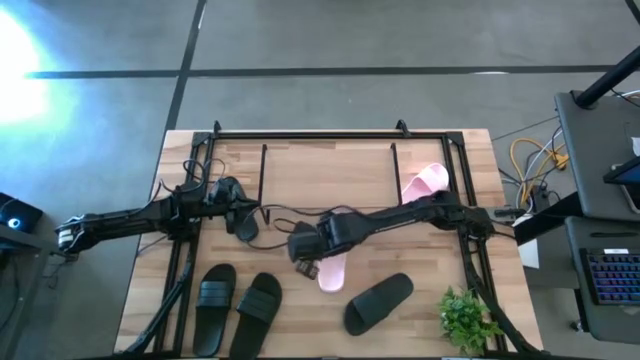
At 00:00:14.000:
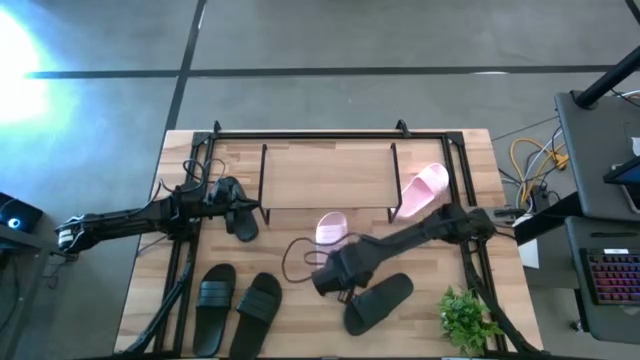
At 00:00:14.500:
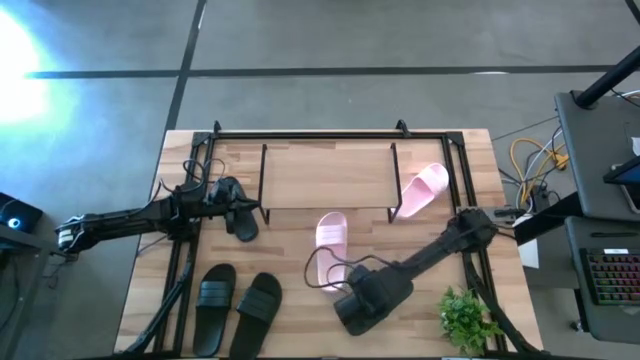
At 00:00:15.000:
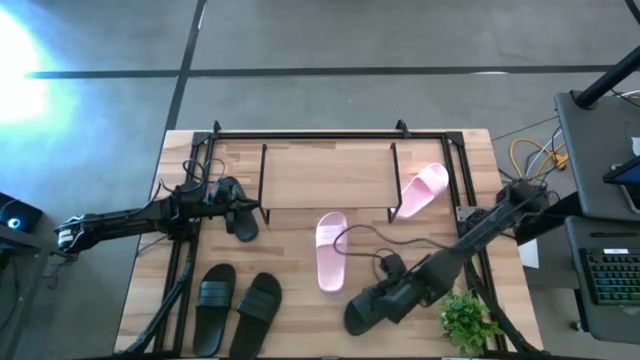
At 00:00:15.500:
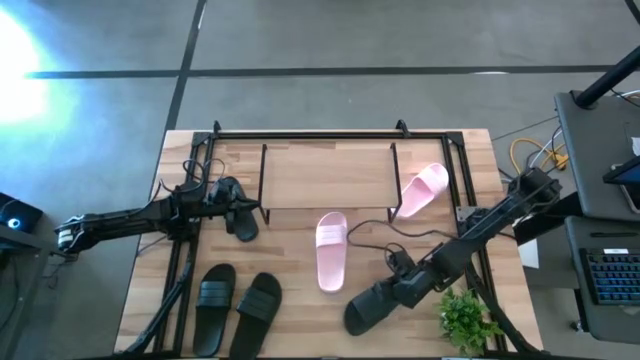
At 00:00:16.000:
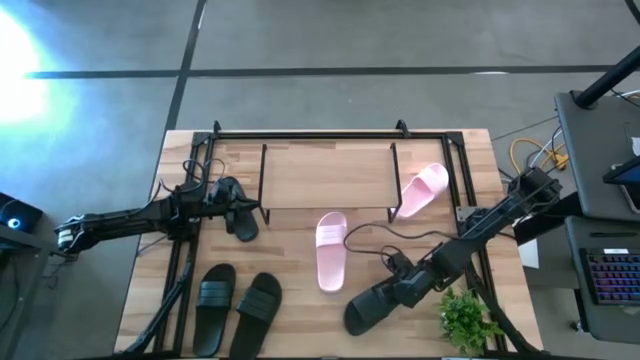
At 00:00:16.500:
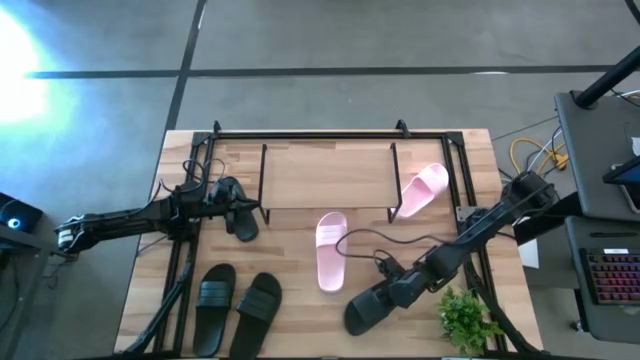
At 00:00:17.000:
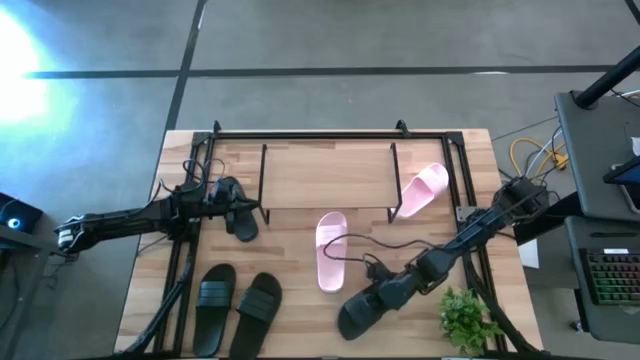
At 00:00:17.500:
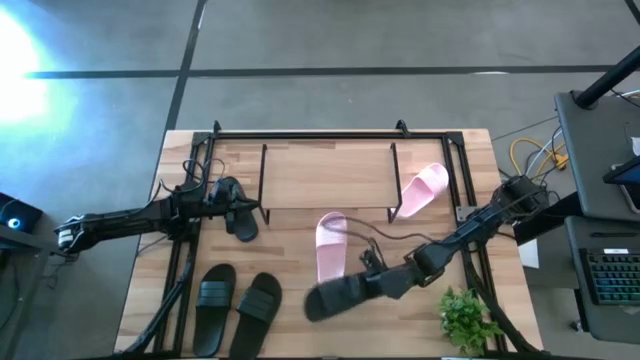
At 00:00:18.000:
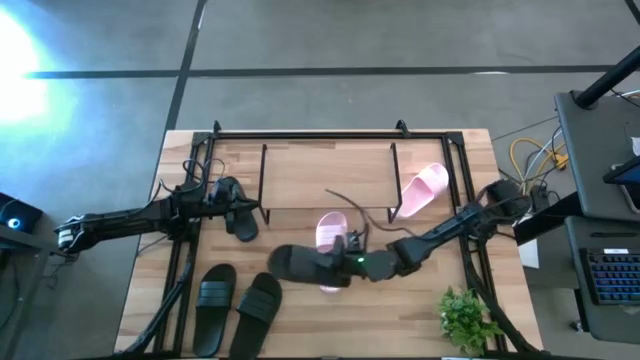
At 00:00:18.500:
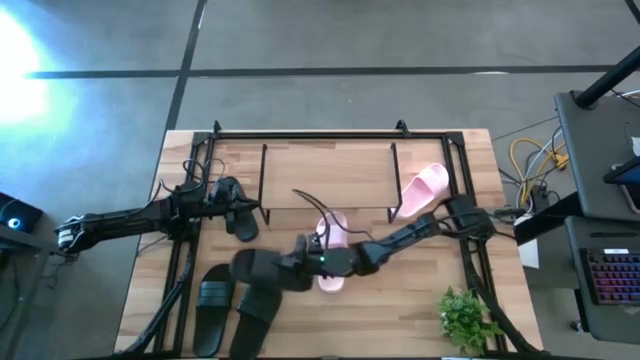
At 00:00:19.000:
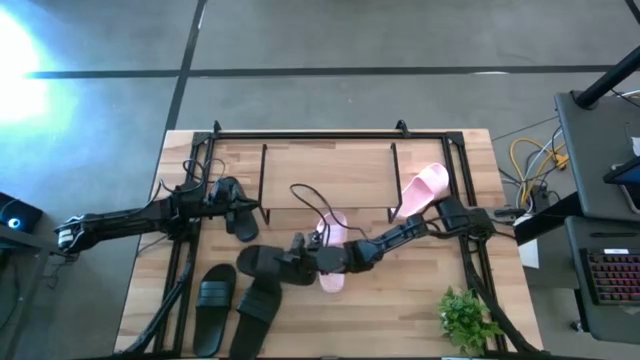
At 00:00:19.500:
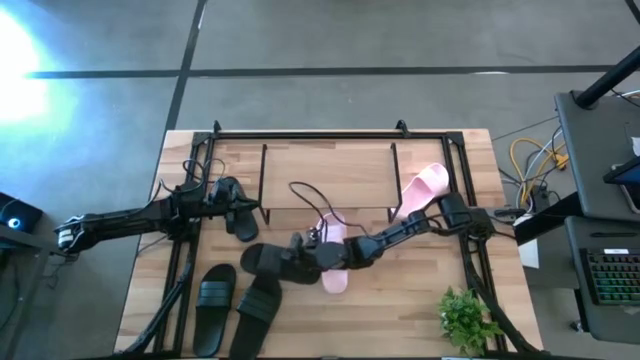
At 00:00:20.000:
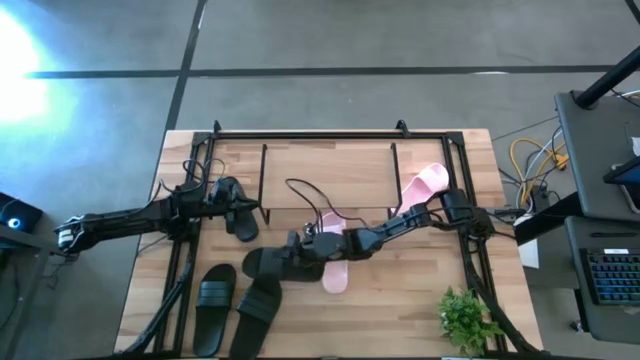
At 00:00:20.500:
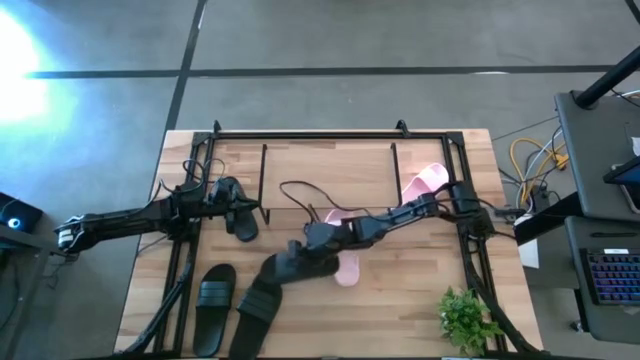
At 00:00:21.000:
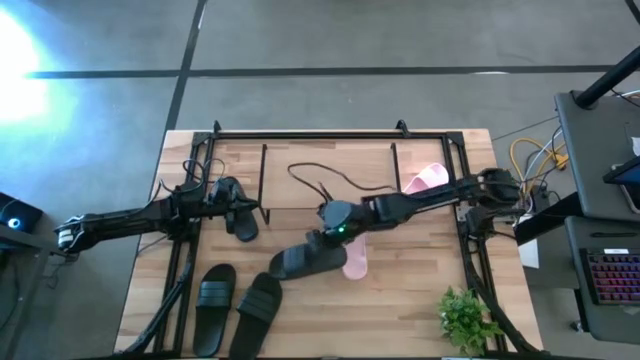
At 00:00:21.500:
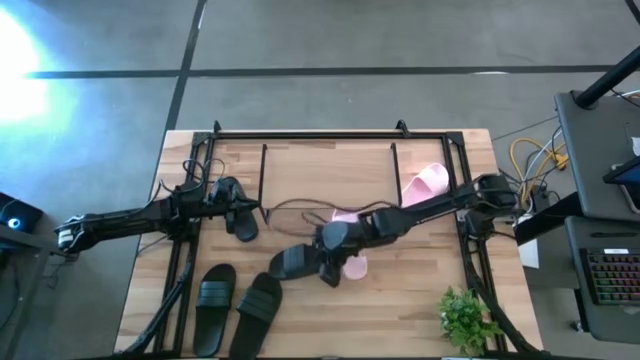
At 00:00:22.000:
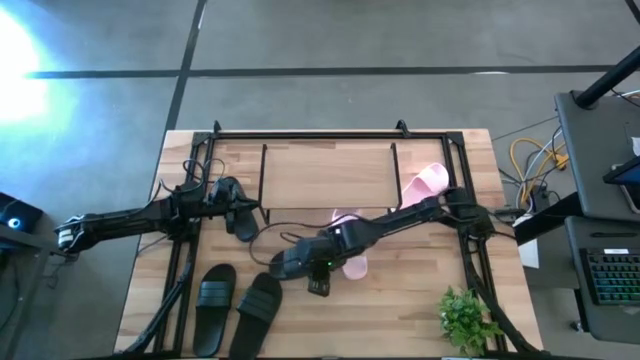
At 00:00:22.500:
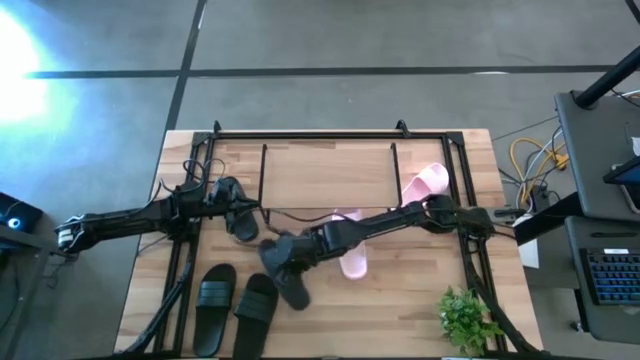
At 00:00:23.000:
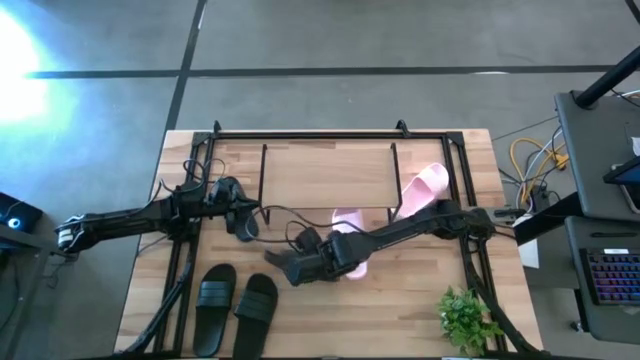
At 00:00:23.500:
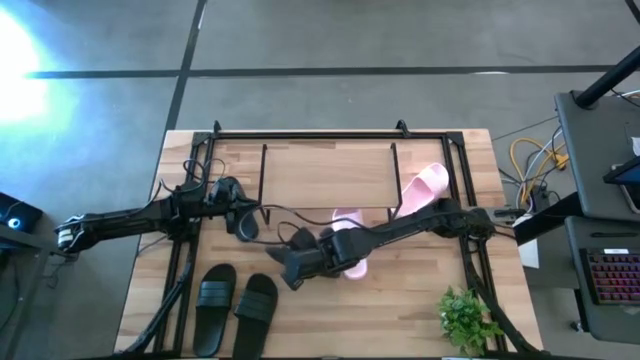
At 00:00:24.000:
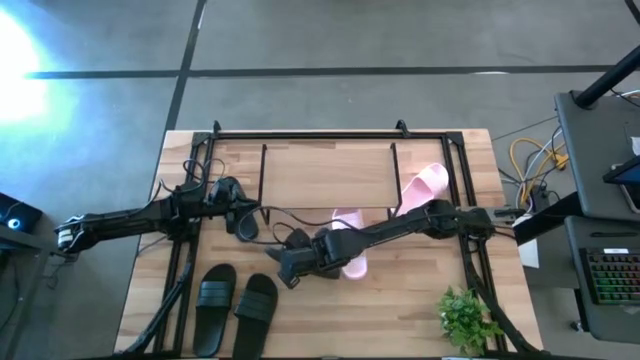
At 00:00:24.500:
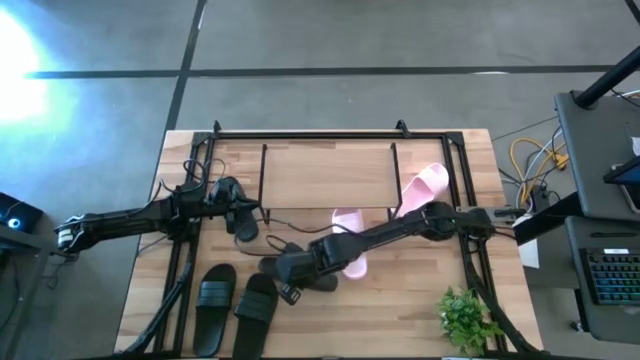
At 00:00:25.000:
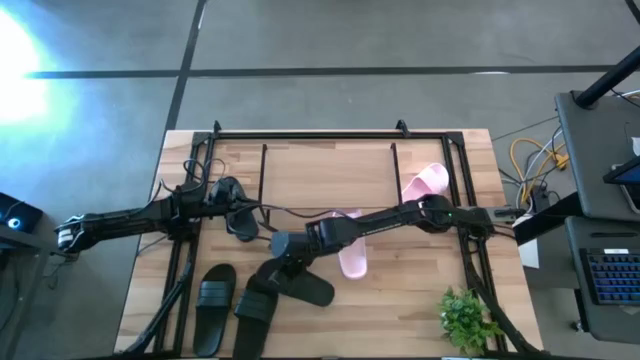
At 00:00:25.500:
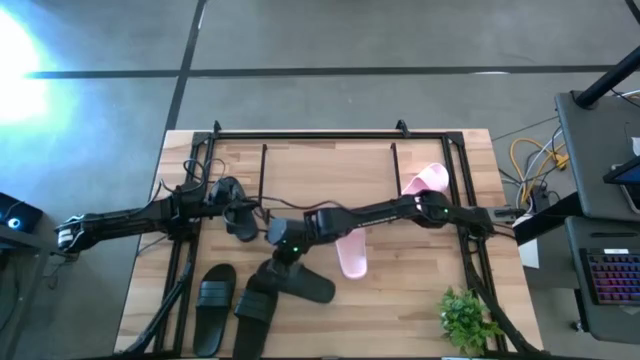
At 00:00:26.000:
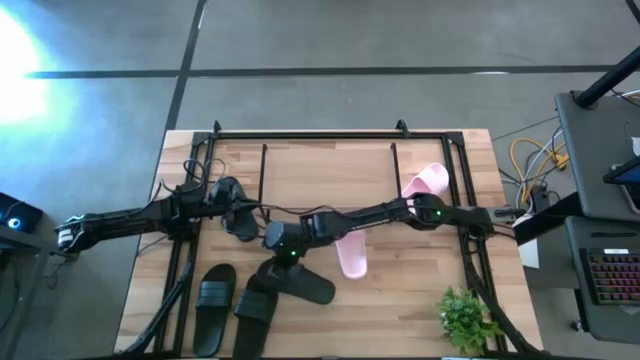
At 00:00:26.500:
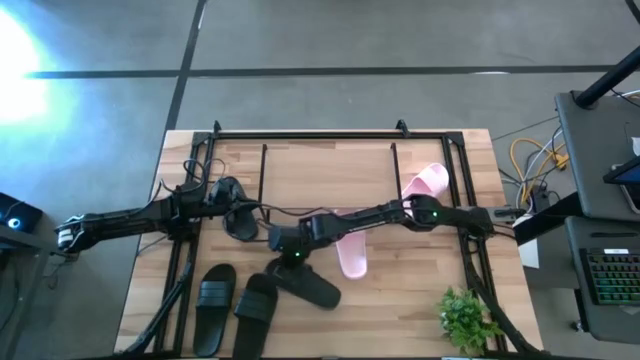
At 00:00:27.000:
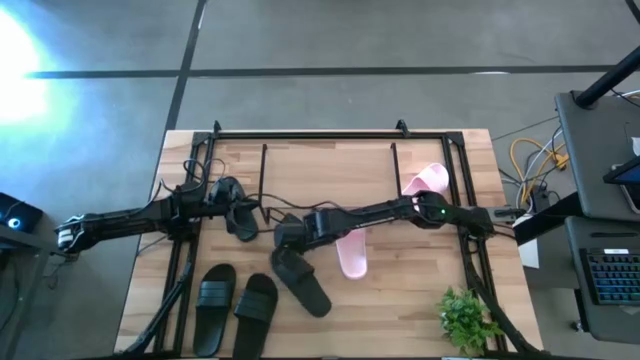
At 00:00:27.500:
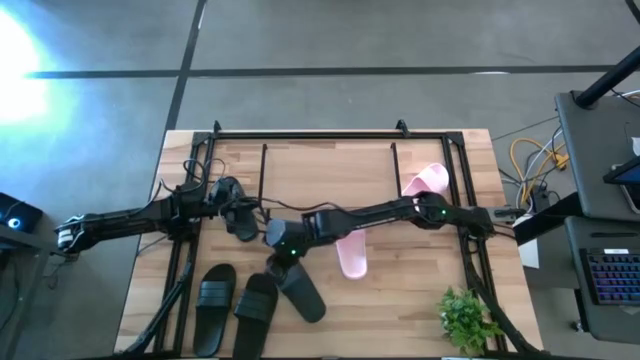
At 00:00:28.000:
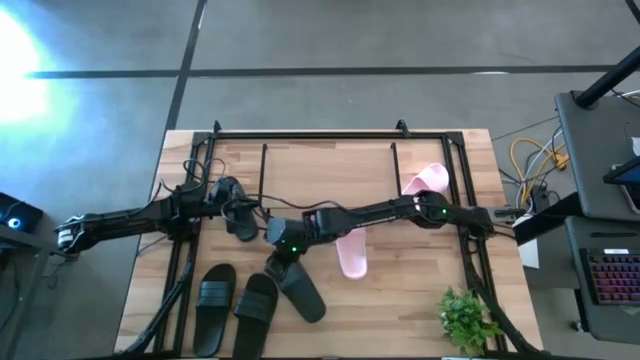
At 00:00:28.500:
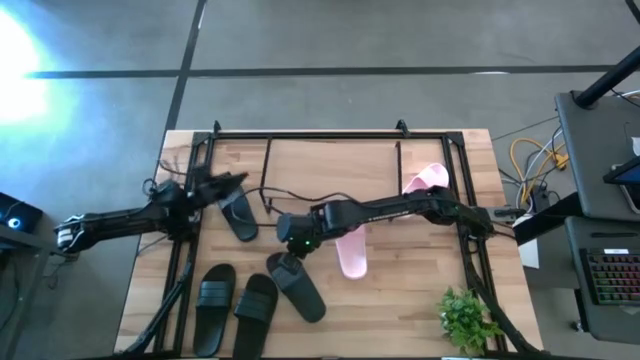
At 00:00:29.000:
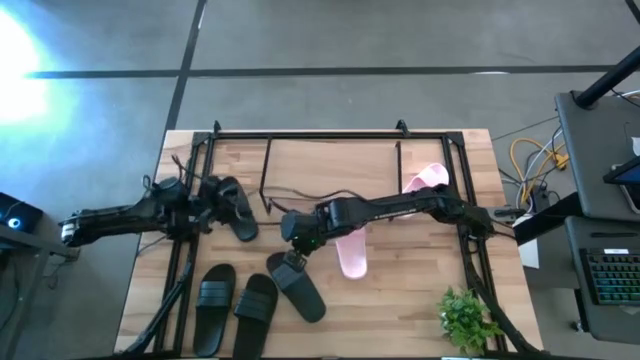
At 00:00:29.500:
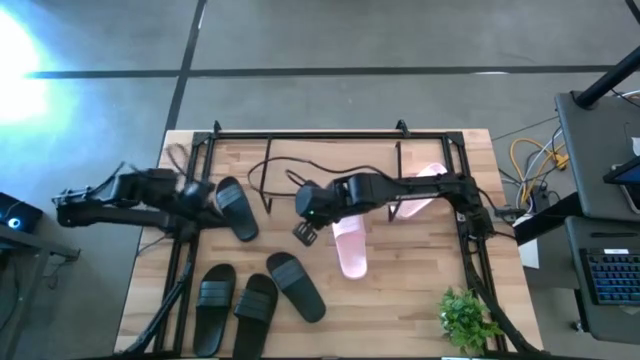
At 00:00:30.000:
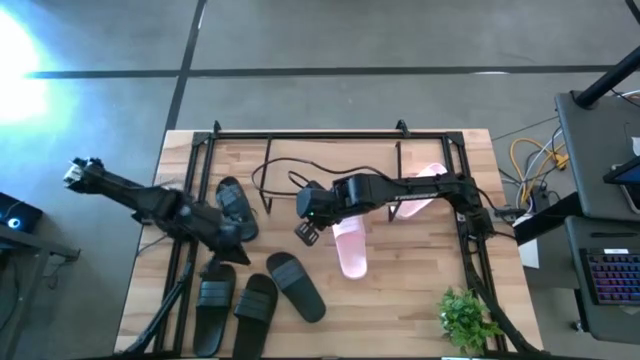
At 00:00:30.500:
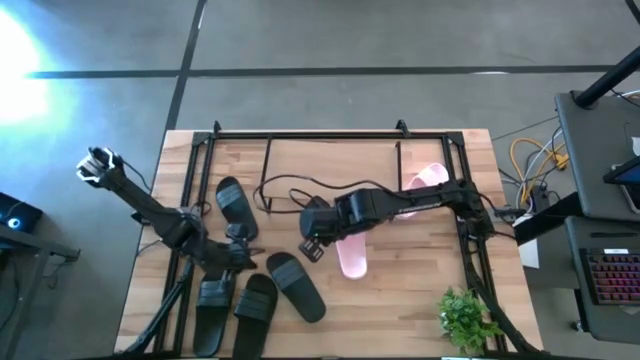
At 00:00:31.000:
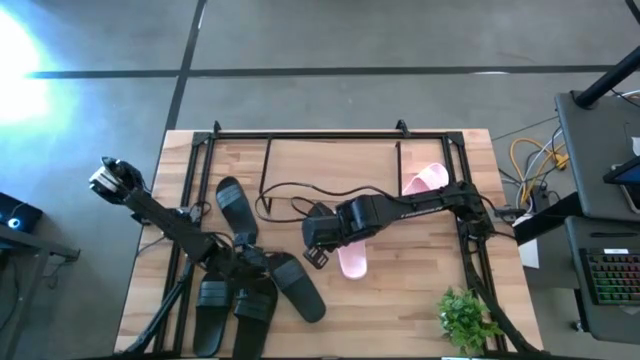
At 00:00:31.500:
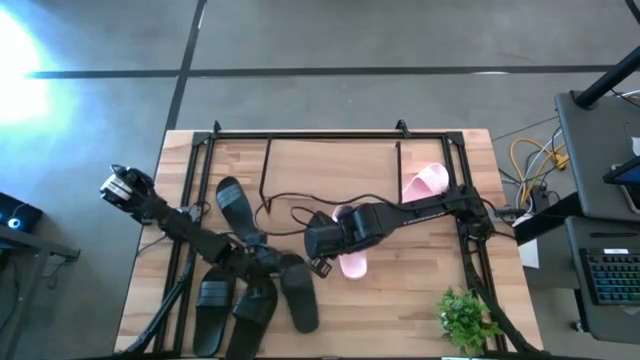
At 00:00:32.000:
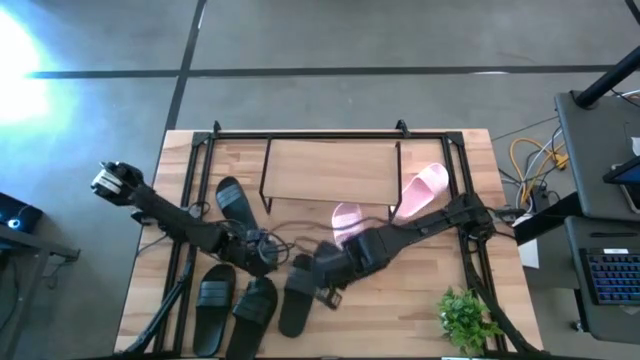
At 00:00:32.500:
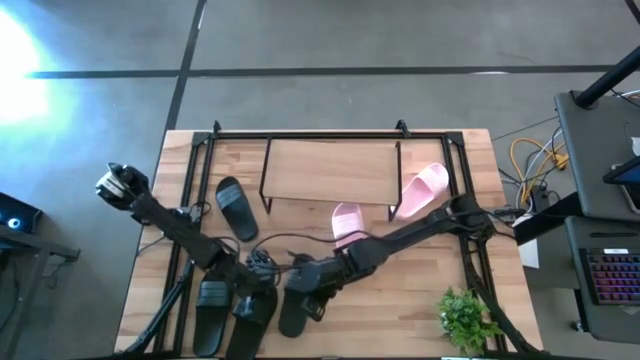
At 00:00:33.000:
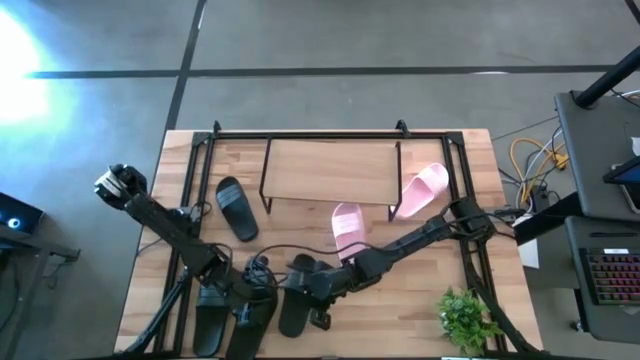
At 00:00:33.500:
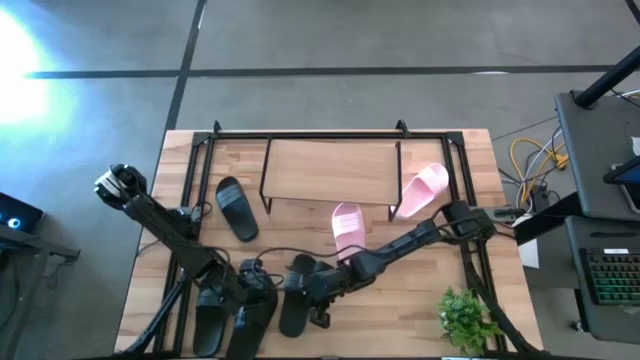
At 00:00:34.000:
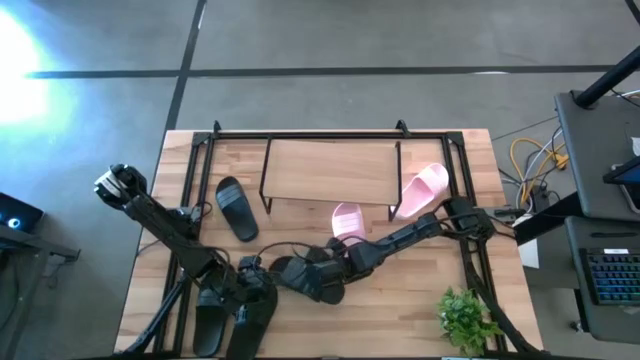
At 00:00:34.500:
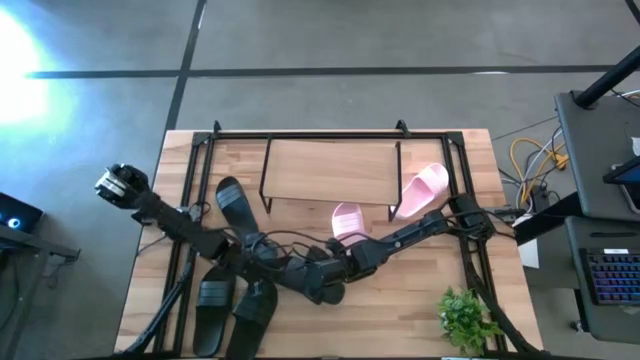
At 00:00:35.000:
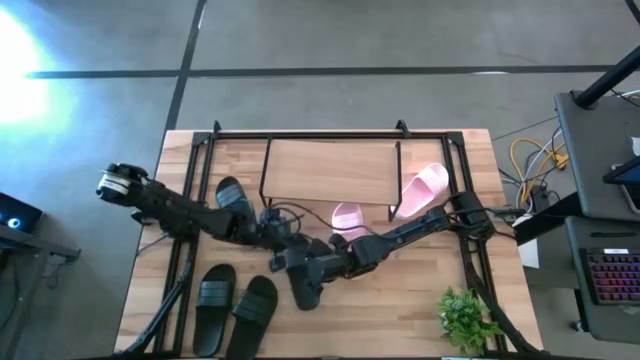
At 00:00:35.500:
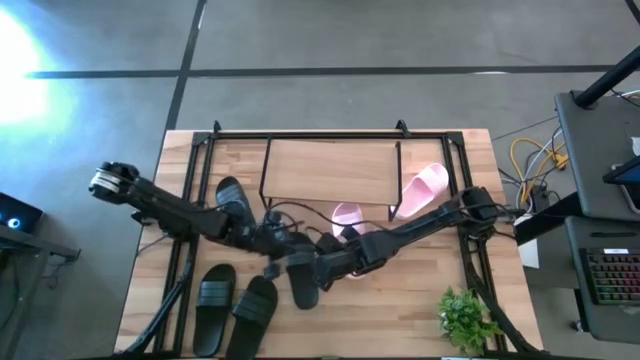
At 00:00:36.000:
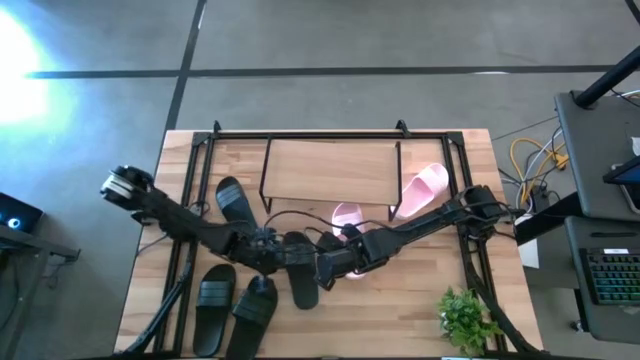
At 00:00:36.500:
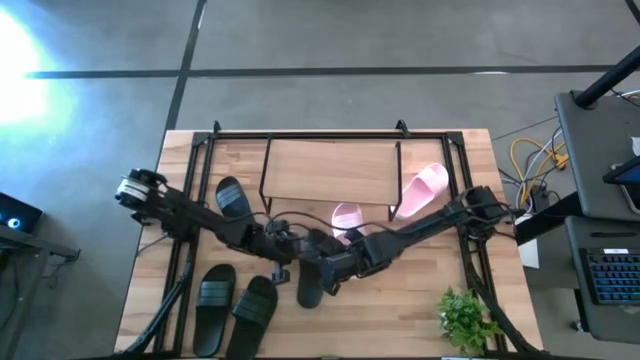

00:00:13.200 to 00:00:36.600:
Task: Pick and place slides into the shelf
Move the bottom black slides to the center of the table
